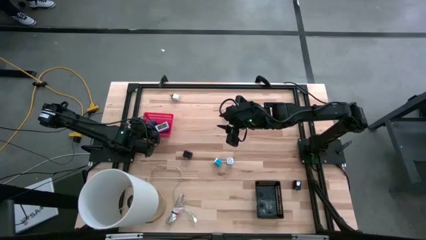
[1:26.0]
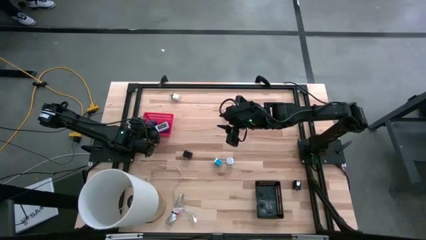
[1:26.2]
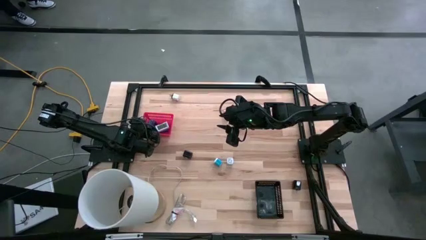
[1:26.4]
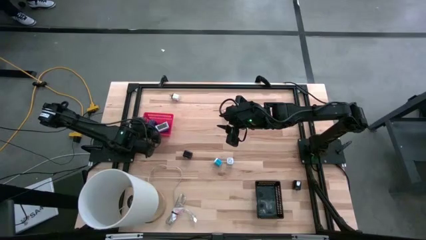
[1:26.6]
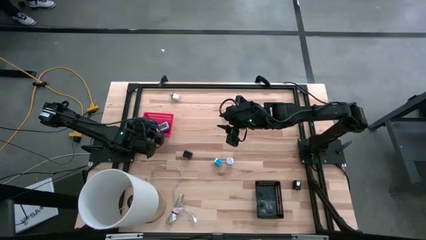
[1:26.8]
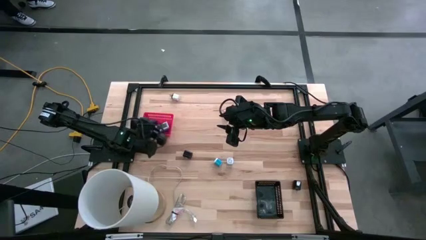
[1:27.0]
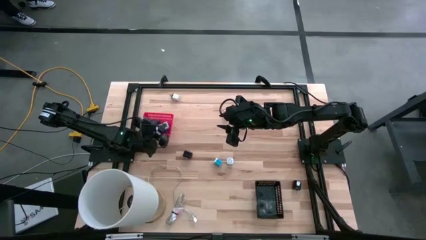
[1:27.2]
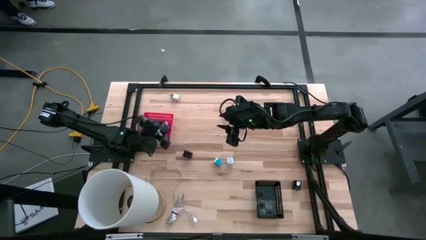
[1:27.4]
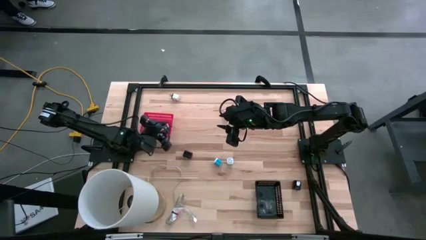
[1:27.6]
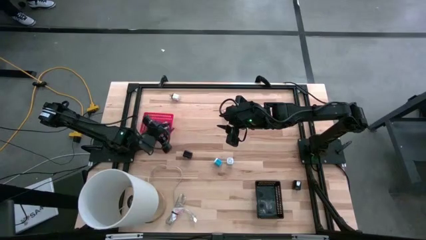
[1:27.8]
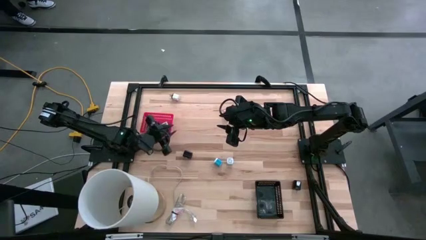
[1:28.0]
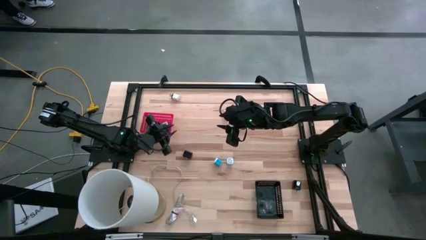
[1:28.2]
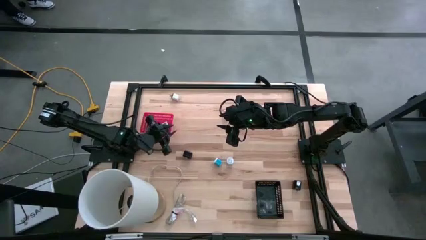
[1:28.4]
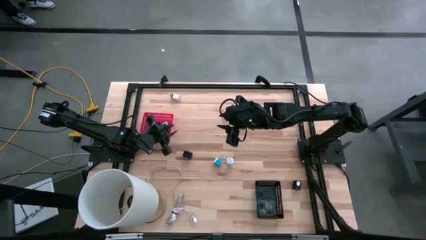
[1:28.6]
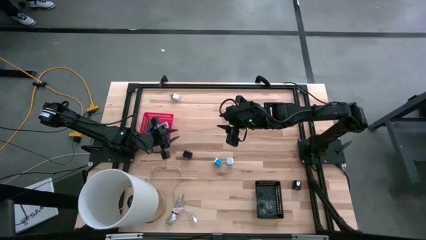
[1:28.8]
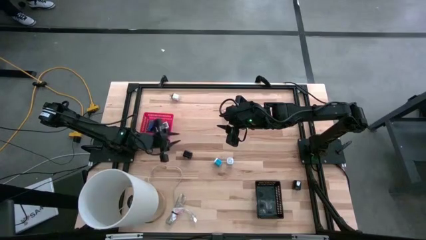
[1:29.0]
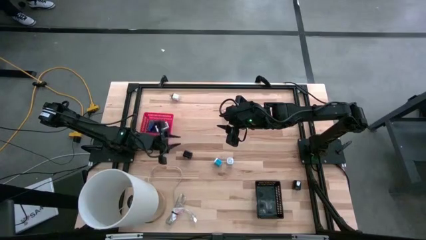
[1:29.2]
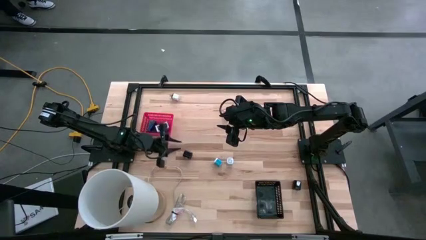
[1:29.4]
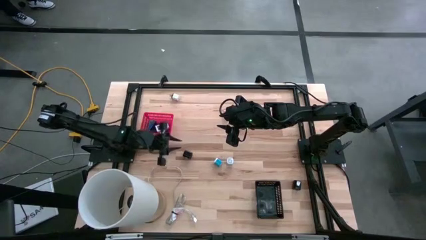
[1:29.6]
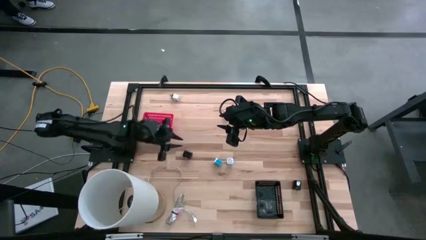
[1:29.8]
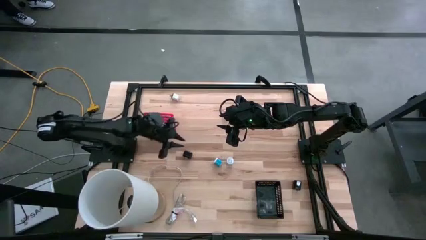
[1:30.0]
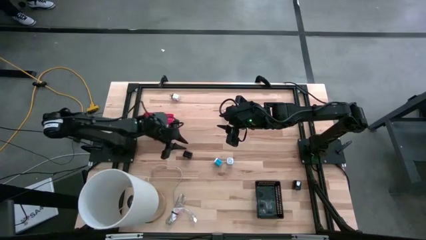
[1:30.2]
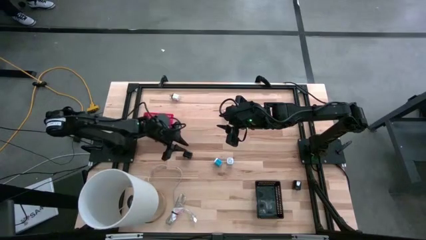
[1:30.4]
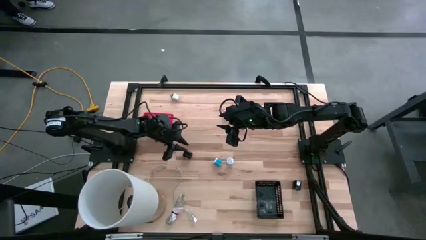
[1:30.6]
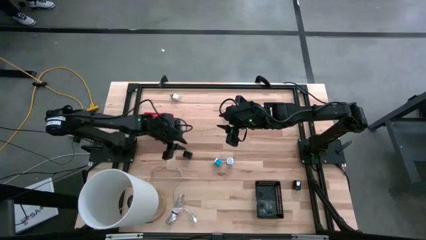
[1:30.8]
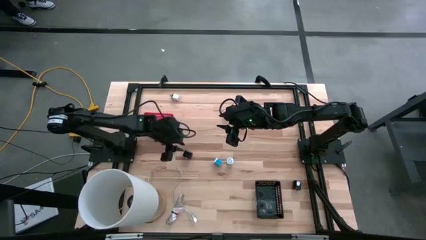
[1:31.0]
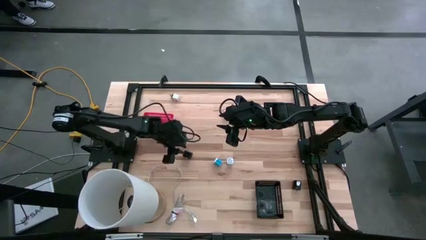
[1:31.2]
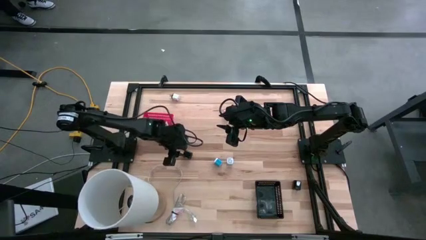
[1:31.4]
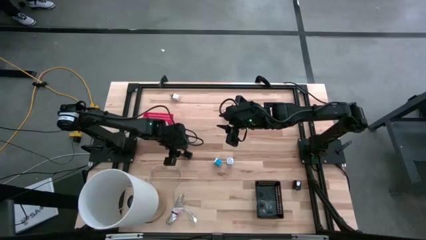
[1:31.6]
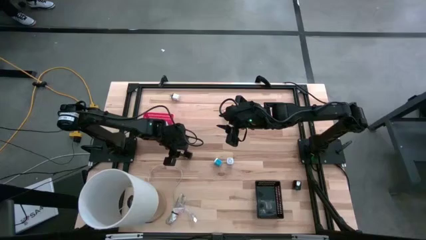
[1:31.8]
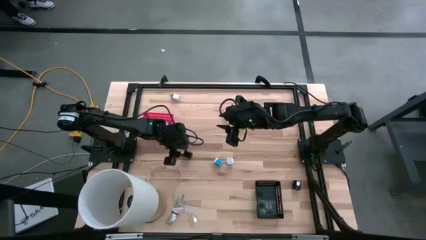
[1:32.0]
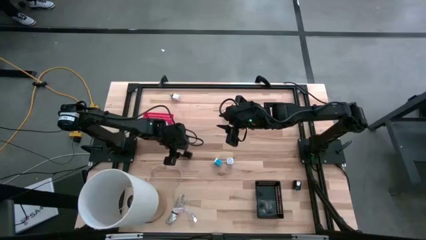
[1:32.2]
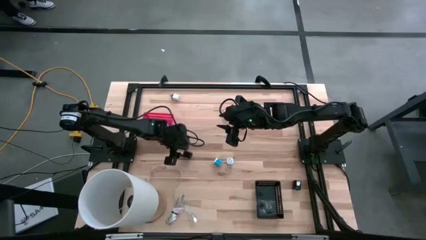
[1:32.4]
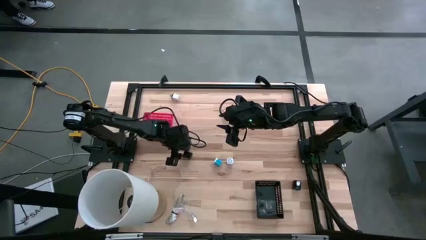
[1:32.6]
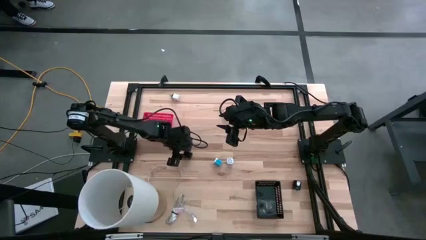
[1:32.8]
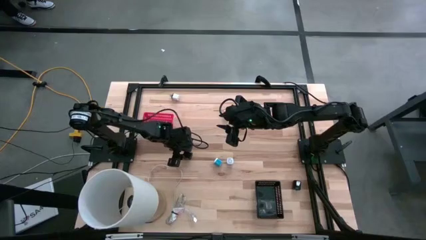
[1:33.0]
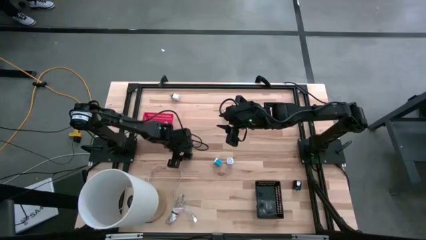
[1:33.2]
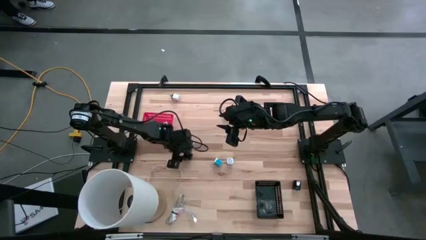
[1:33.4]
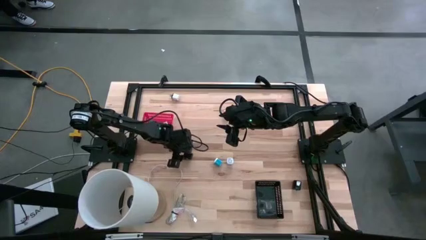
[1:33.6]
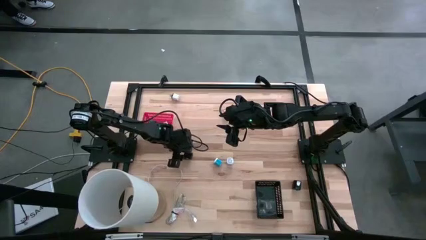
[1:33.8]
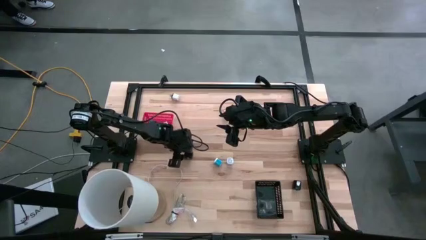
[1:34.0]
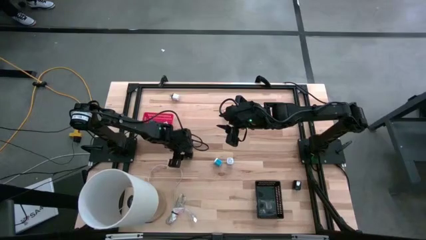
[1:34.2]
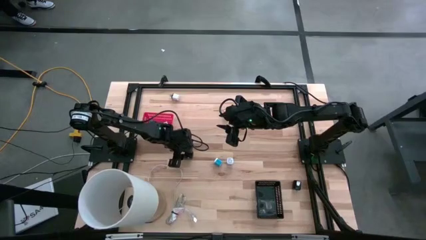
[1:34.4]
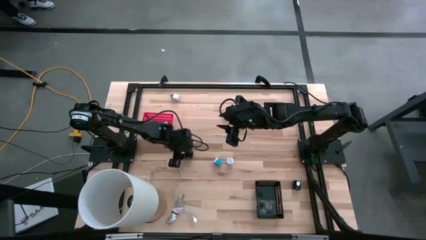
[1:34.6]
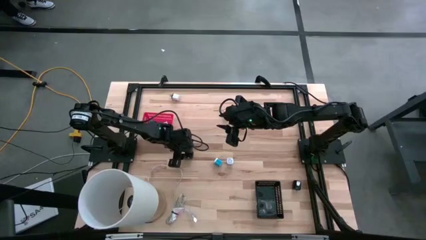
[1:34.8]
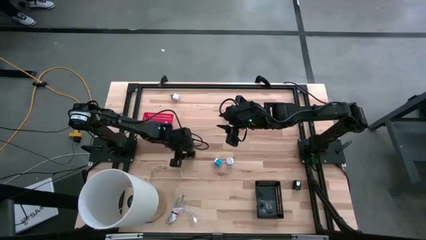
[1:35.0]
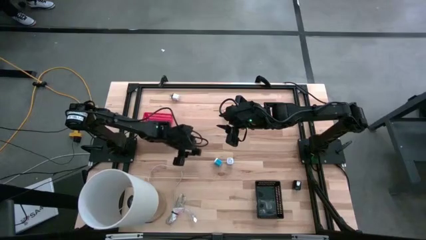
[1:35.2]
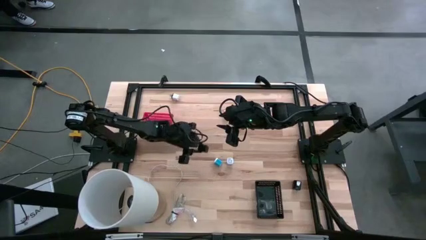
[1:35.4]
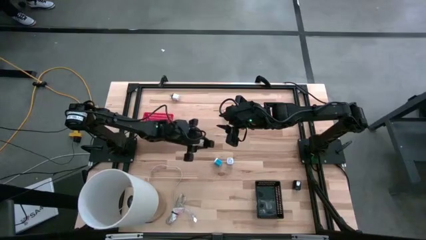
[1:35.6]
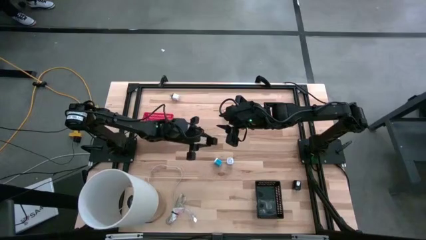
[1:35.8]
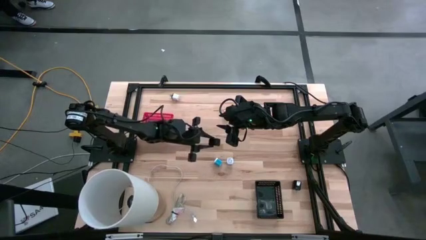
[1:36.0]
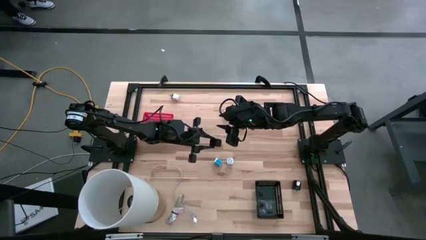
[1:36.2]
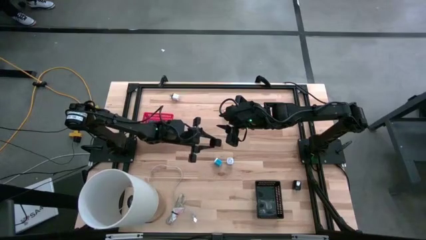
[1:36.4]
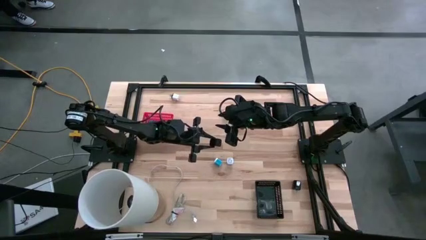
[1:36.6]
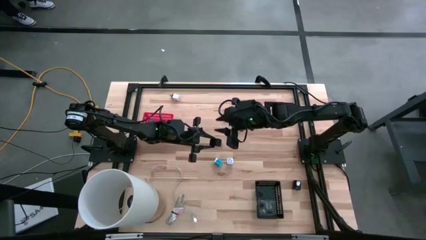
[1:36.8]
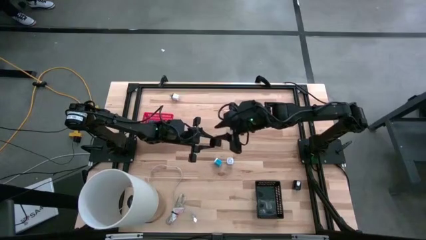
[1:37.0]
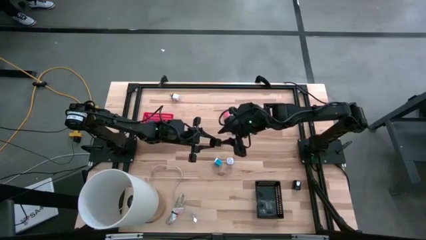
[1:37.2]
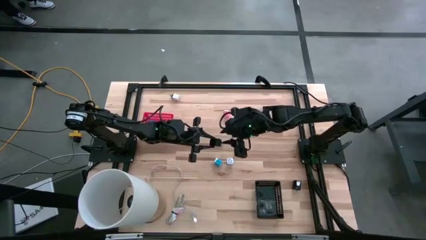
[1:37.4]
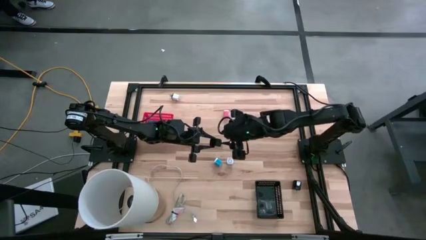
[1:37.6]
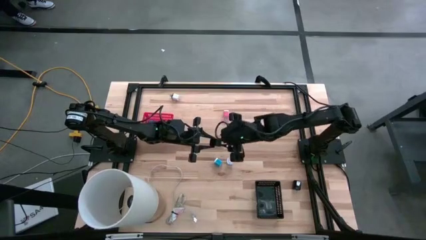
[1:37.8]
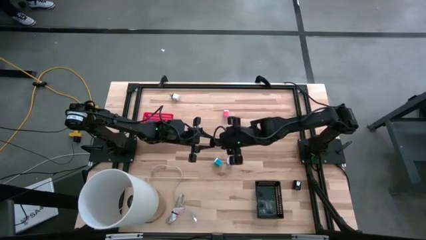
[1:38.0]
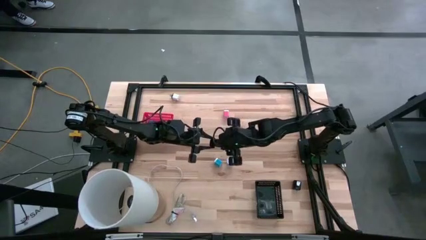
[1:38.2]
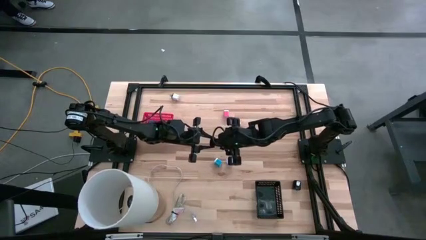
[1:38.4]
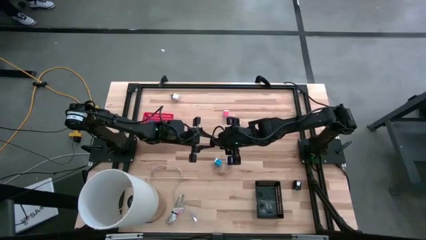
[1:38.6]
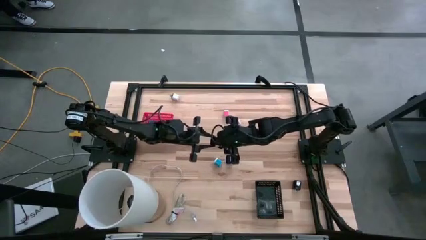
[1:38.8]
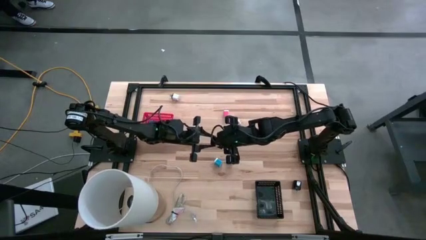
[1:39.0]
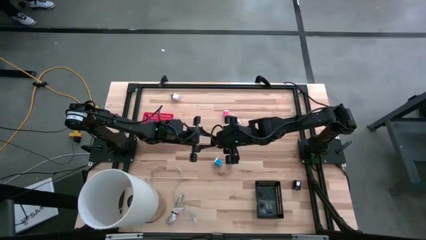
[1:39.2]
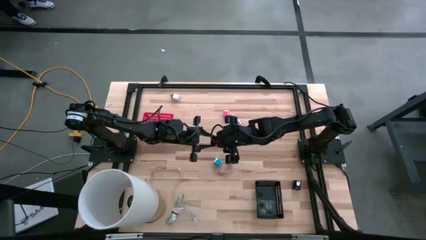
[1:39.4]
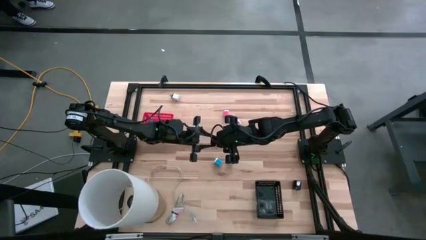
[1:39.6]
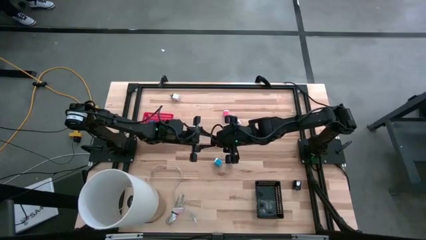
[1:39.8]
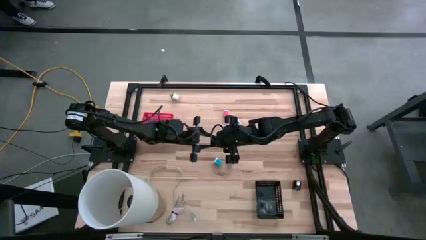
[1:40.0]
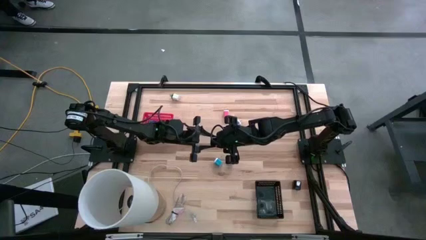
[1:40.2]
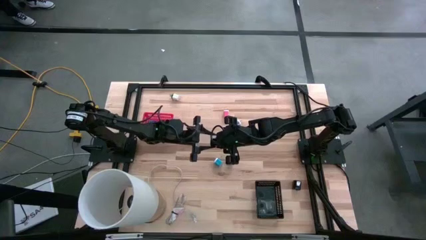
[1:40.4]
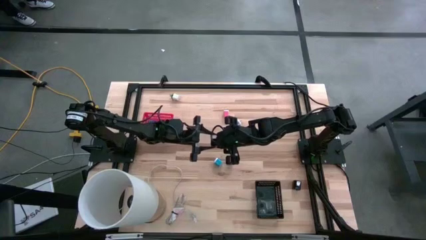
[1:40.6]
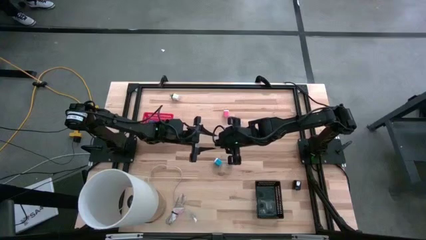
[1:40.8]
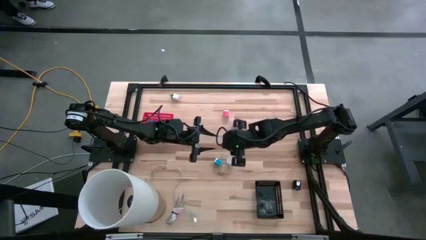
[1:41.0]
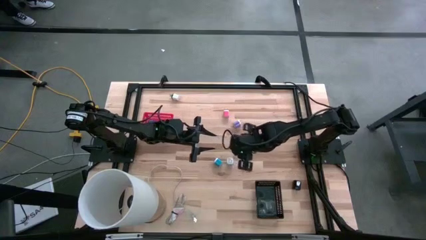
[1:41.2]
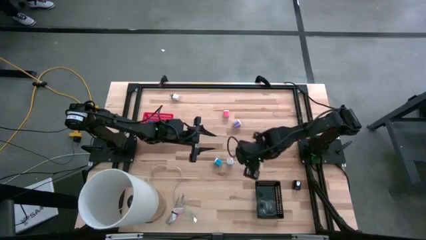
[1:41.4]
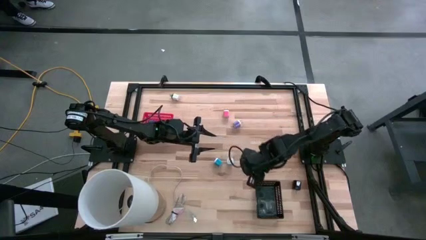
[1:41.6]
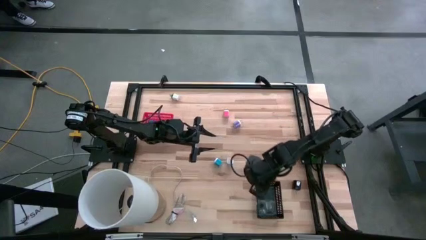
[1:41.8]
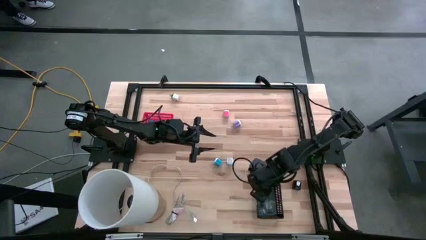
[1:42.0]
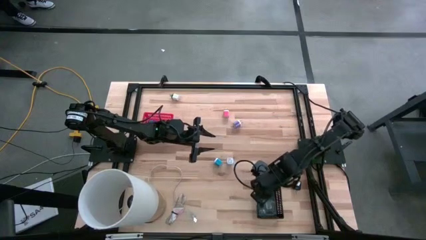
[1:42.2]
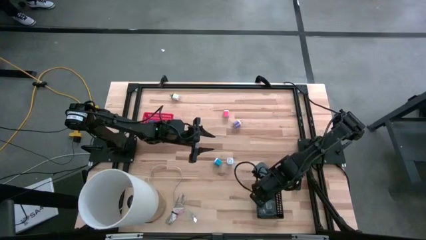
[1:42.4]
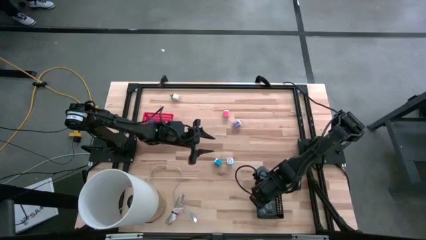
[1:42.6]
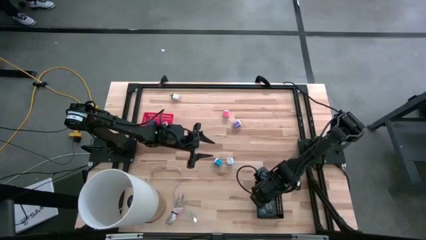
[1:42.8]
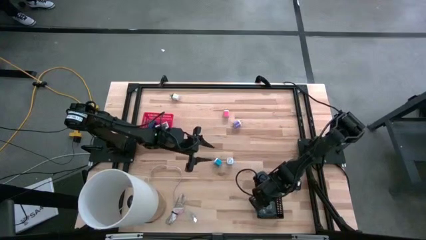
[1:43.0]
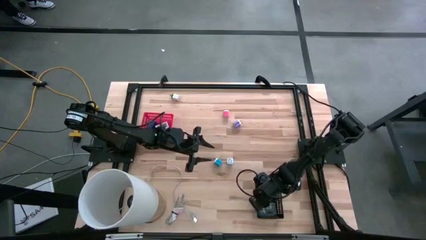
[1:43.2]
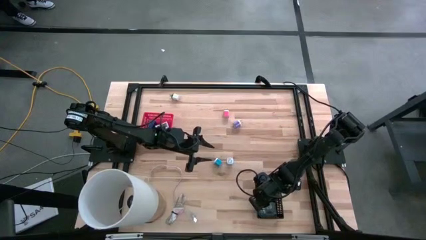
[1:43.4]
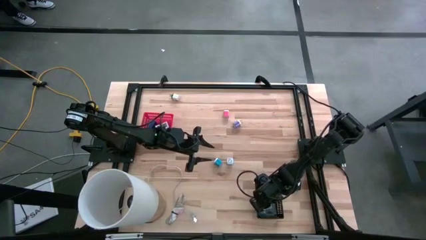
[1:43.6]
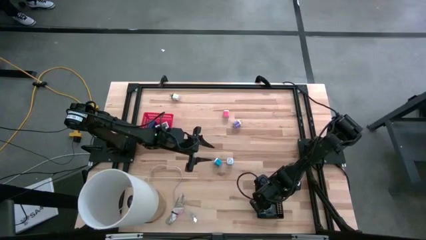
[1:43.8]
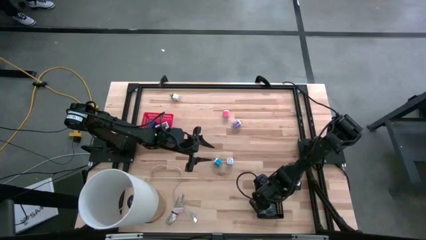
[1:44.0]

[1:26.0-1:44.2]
Task: Pick & Place Office items
Put the left black charger adapter into the black bin
